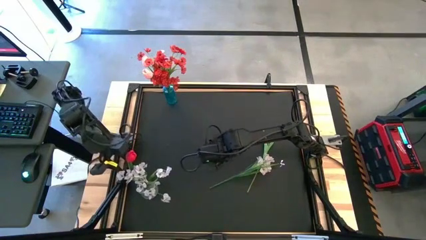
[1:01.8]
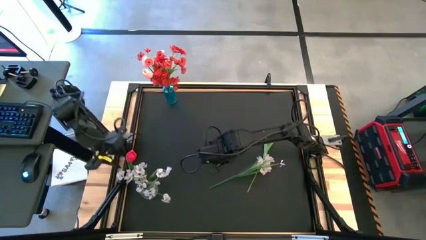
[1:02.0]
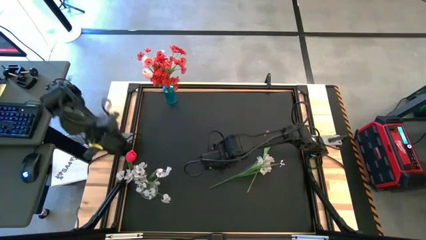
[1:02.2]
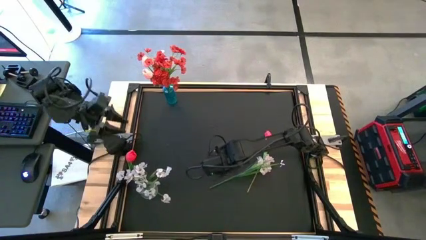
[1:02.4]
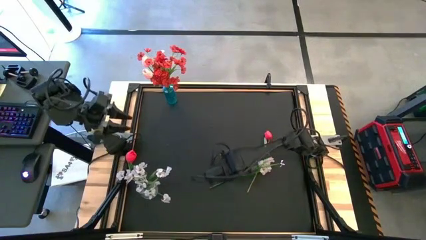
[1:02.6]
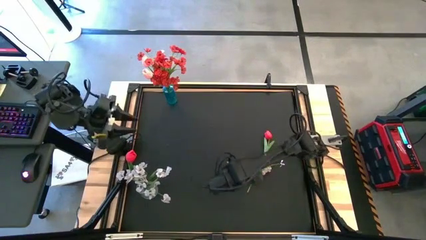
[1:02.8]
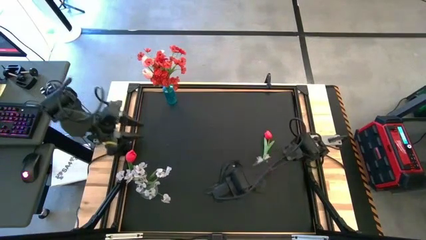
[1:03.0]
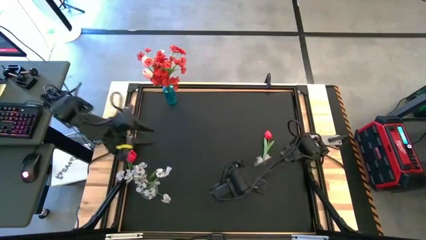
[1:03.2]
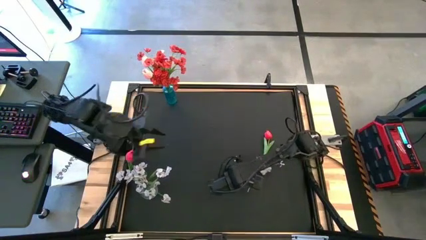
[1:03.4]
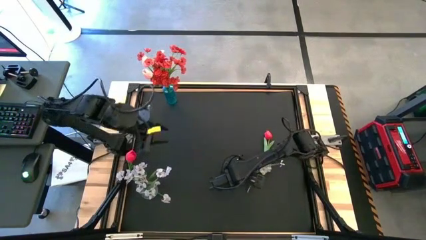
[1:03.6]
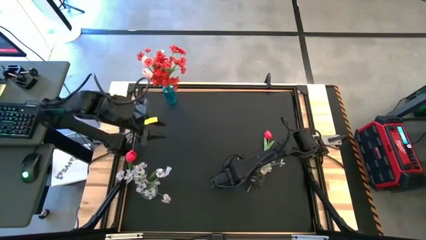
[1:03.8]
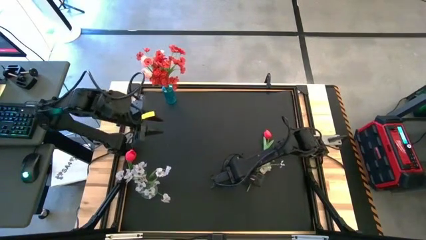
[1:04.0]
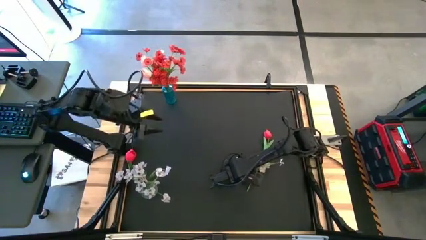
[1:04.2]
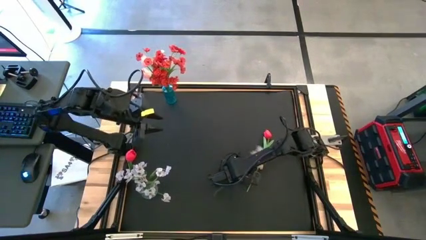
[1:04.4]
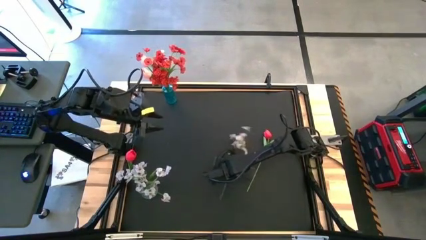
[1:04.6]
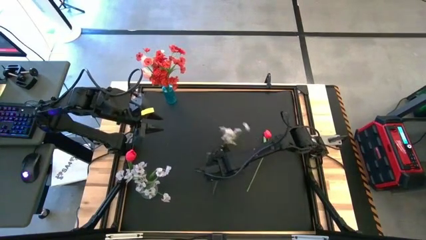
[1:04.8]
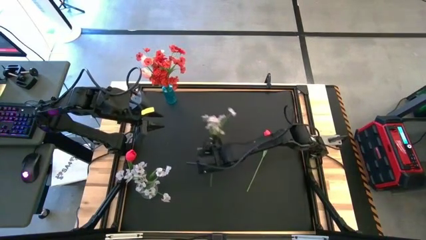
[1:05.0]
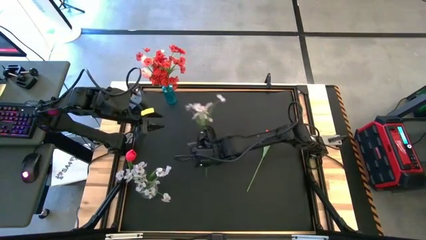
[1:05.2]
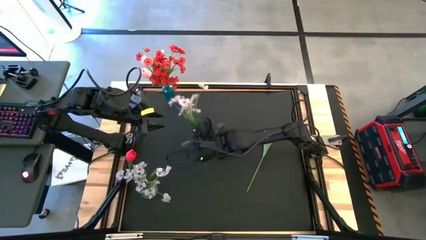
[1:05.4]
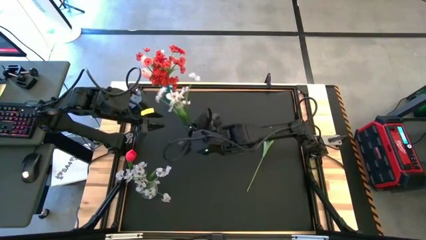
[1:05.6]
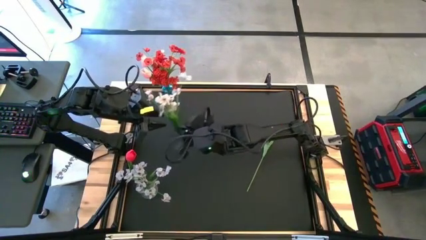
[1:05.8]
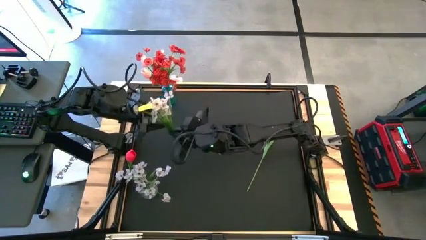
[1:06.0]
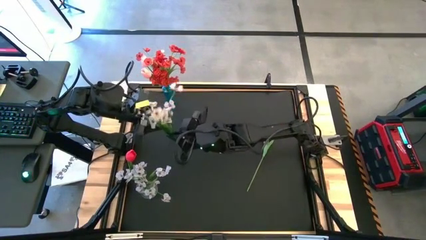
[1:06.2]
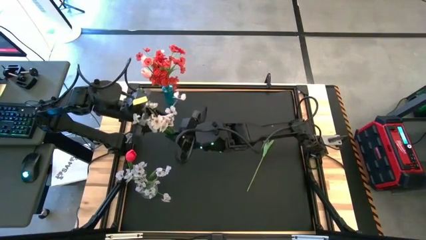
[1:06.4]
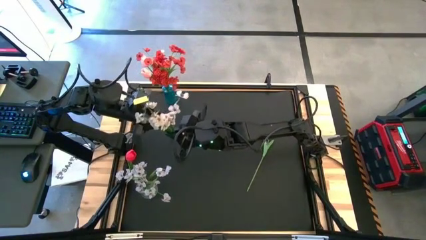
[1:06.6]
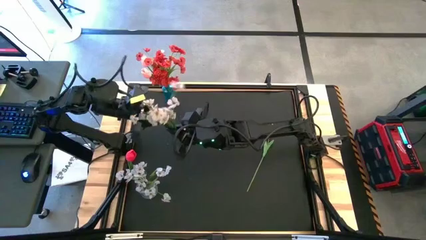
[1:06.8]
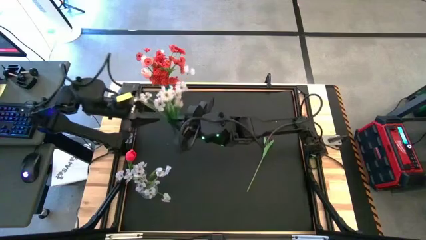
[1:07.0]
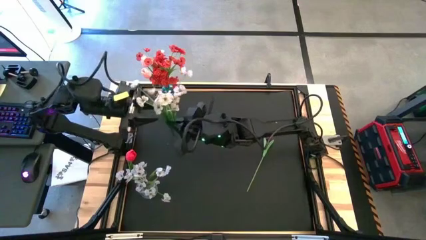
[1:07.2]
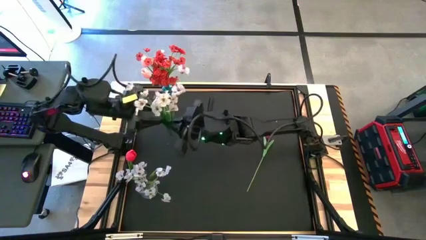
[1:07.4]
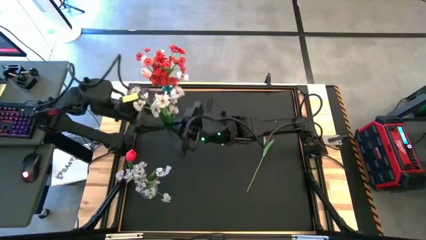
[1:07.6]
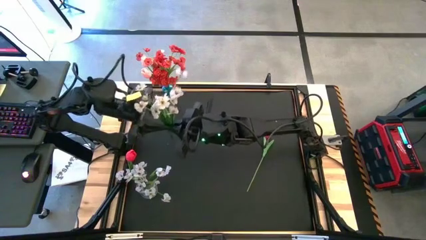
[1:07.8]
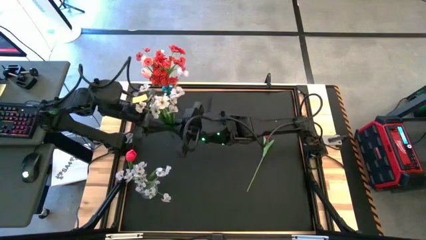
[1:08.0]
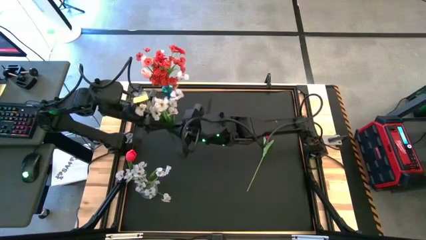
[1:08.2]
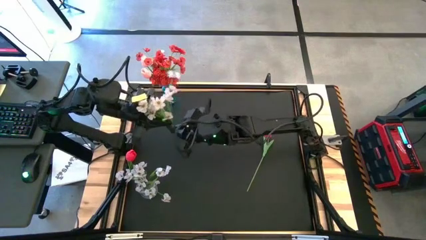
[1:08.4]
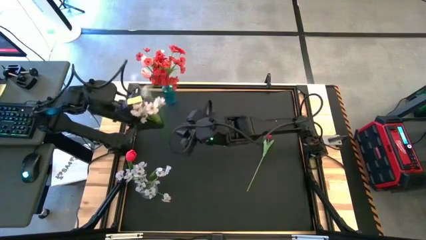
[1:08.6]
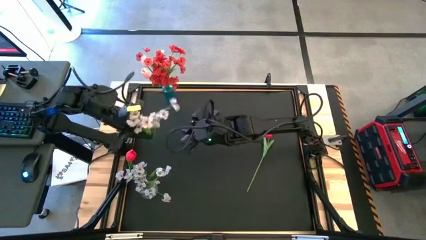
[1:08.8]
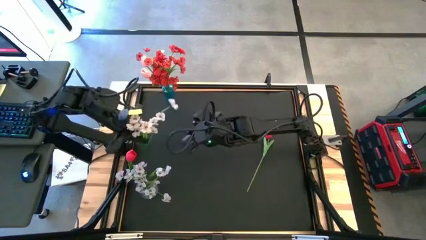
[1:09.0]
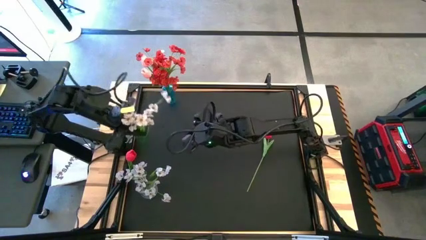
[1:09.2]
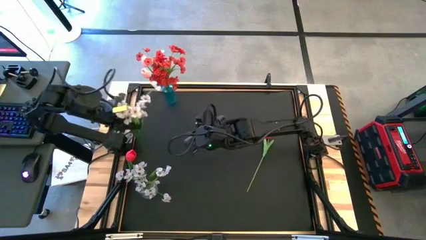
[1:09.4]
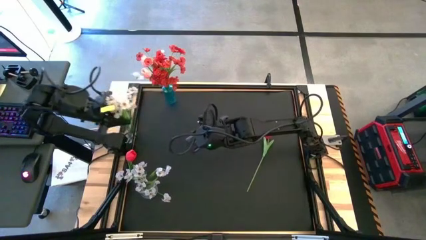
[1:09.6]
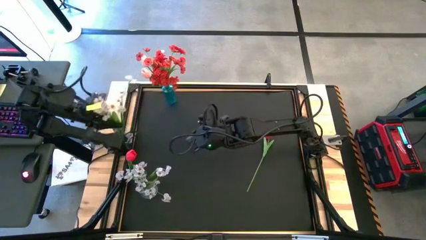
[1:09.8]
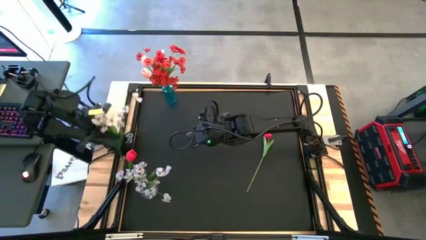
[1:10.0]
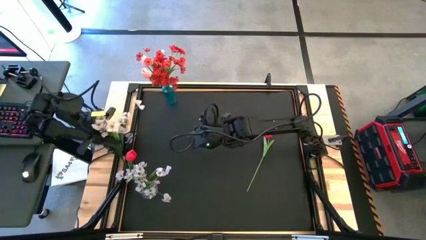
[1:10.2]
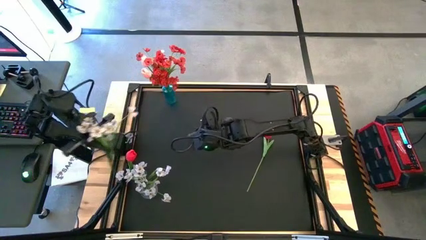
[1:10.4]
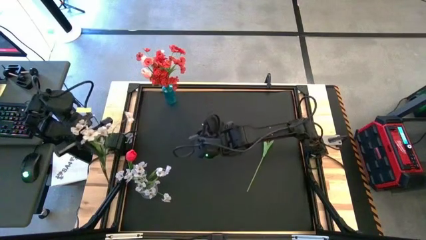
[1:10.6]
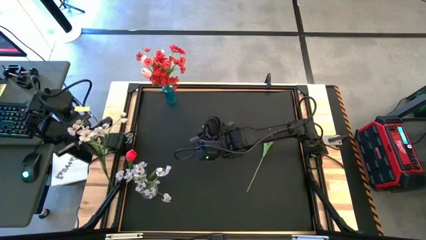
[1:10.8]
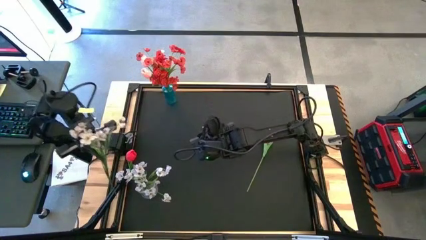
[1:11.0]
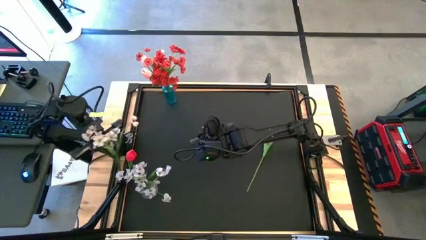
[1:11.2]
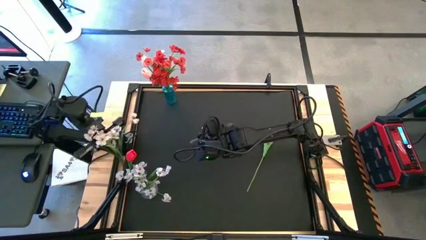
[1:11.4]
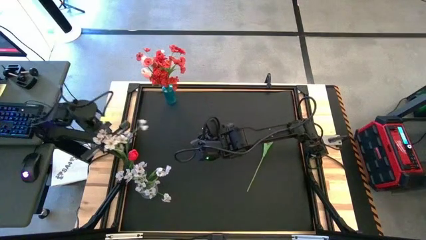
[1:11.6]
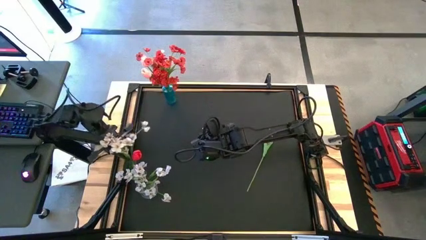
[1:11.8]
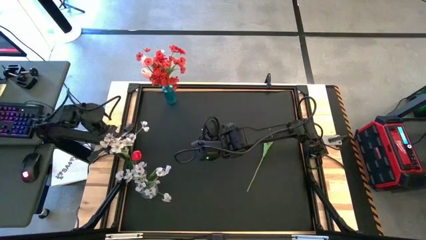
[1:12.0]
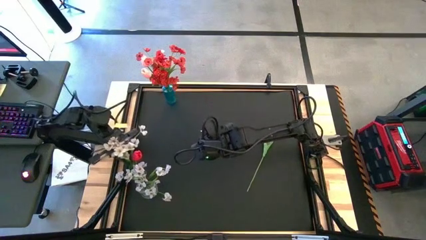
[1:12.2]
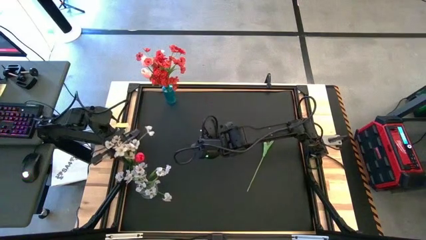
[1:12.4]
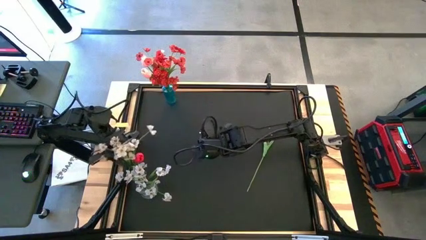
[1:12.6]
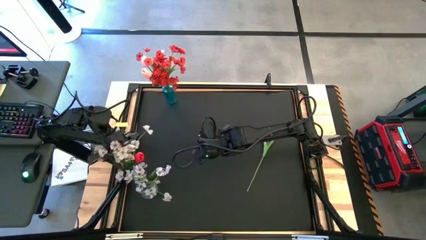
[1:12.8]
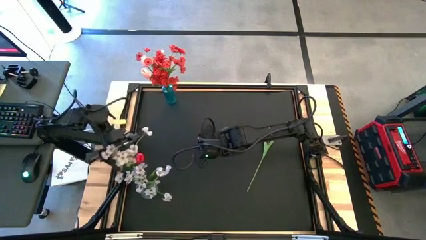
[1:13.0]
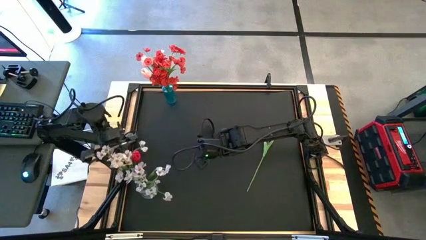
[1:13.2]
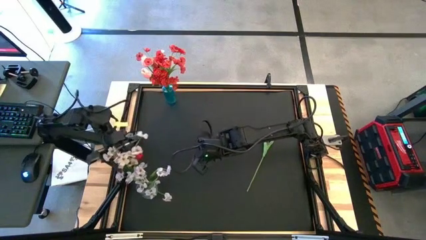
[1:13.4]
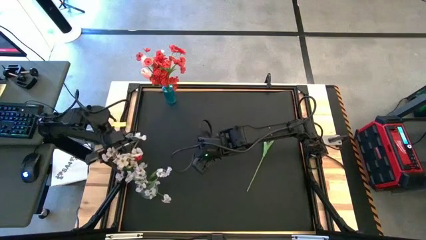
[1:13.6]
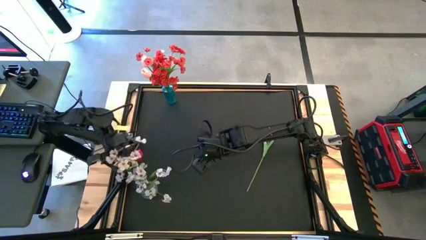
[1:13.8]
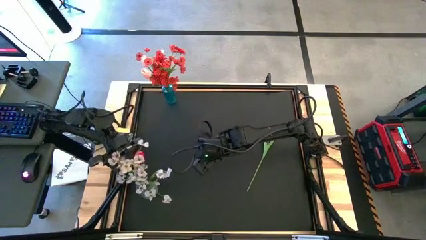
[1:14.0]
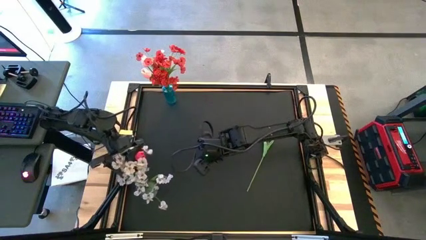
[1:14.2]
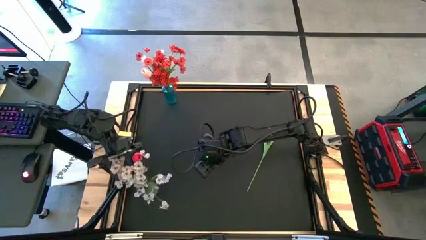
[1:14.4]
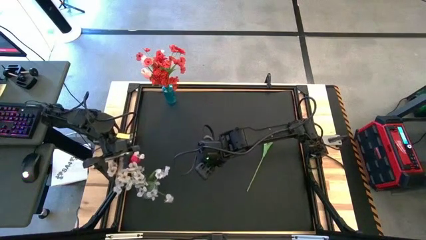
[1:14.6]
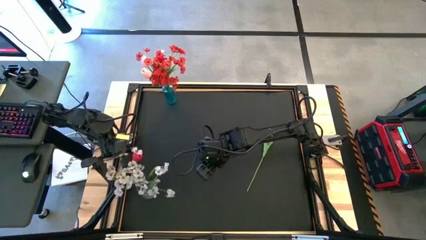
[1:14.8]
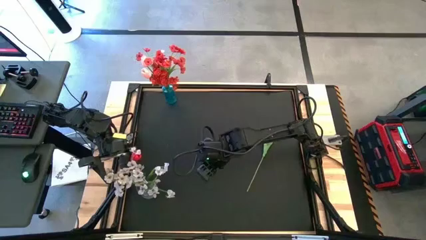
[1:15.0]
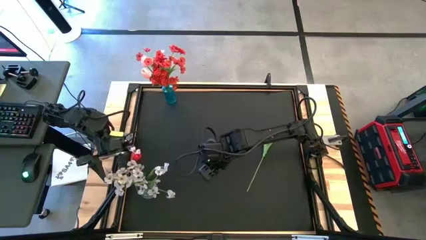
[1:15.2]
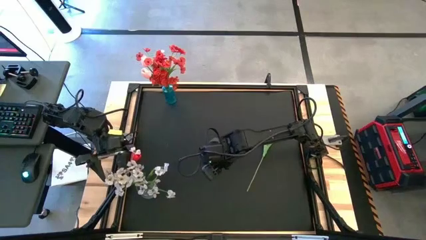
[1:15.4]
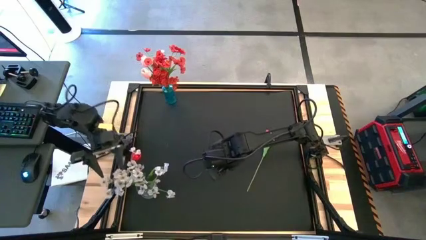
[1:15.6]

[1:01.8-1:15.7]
Task: Sort flowers into vase by color
Put the white flowers into the transparent vase
